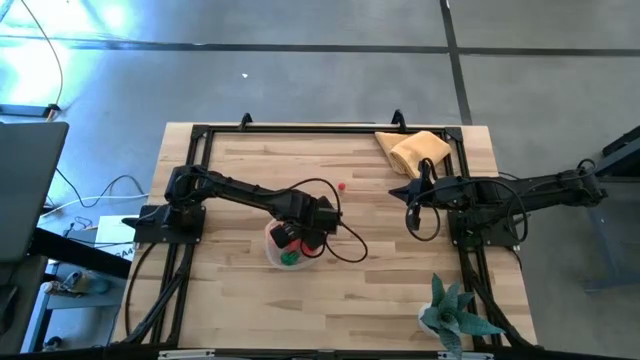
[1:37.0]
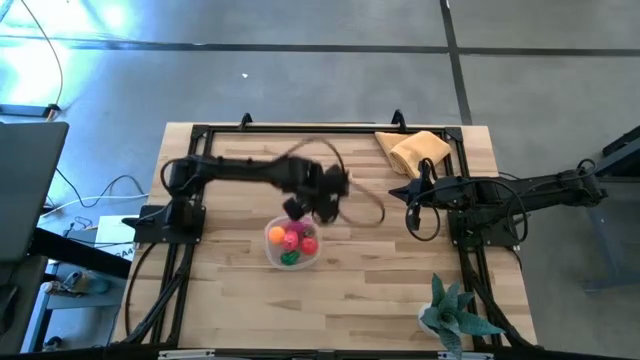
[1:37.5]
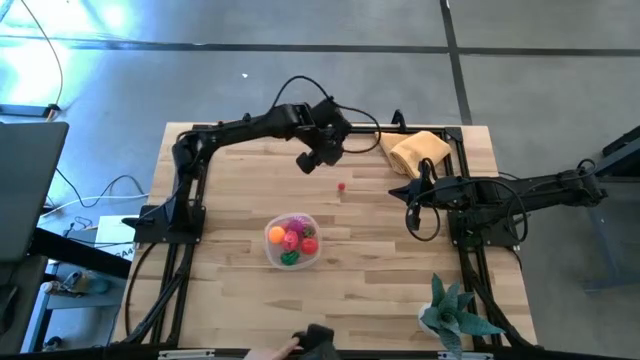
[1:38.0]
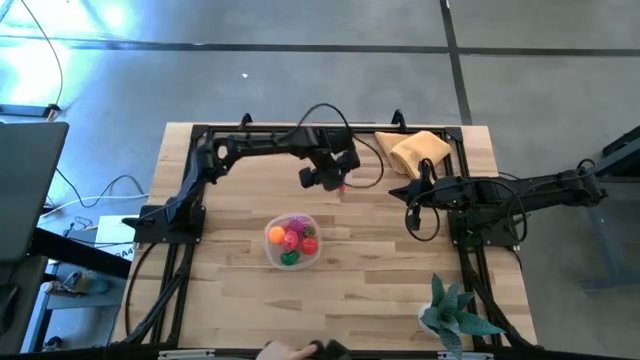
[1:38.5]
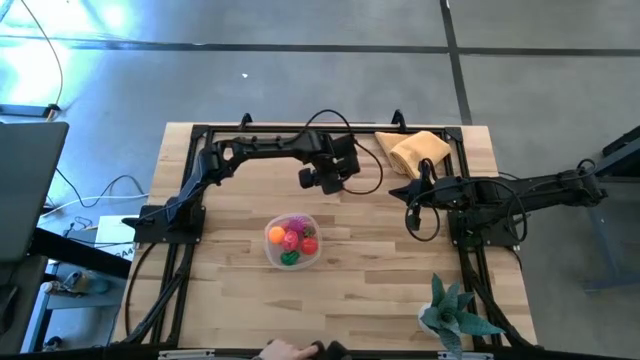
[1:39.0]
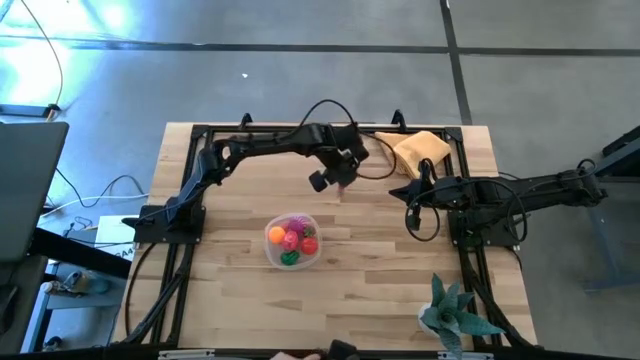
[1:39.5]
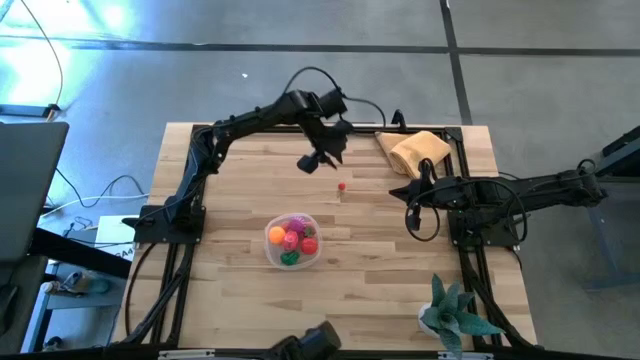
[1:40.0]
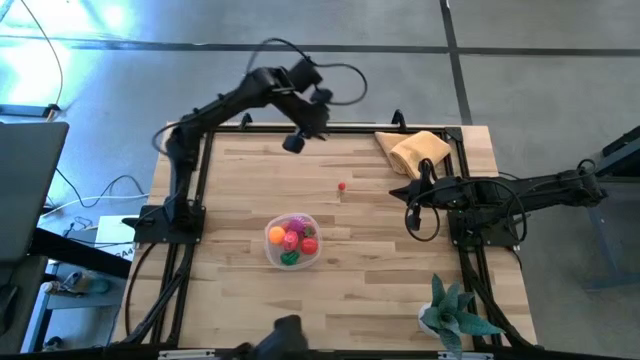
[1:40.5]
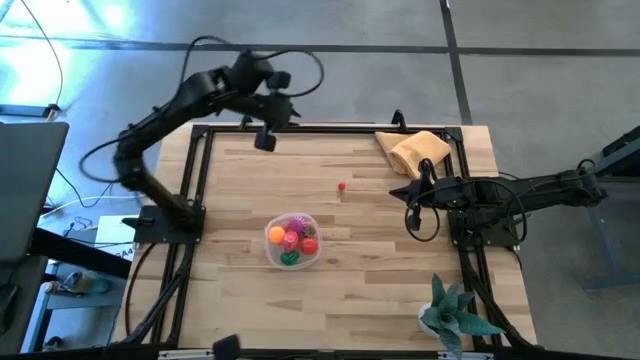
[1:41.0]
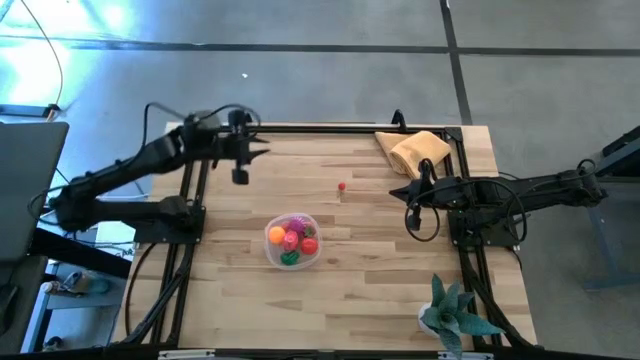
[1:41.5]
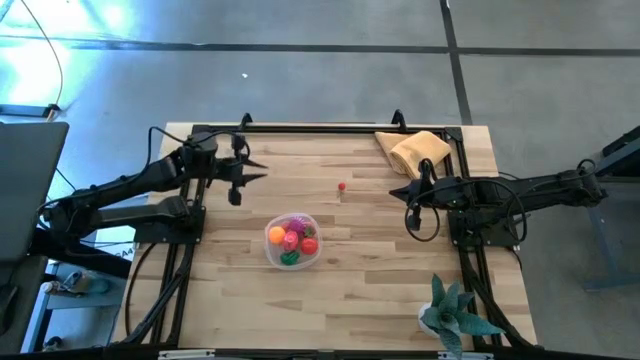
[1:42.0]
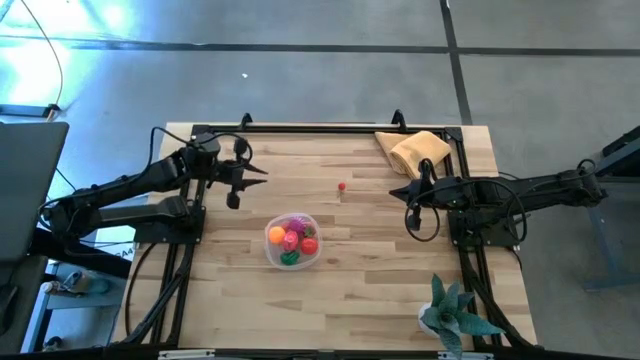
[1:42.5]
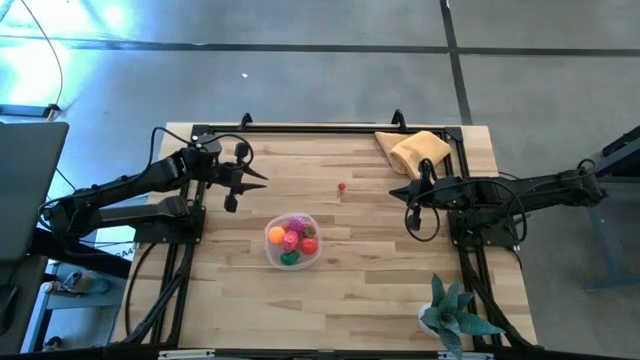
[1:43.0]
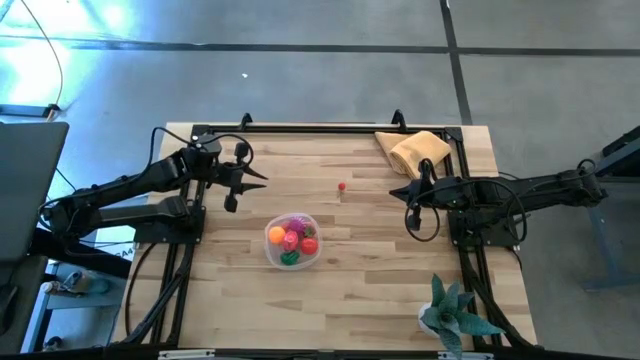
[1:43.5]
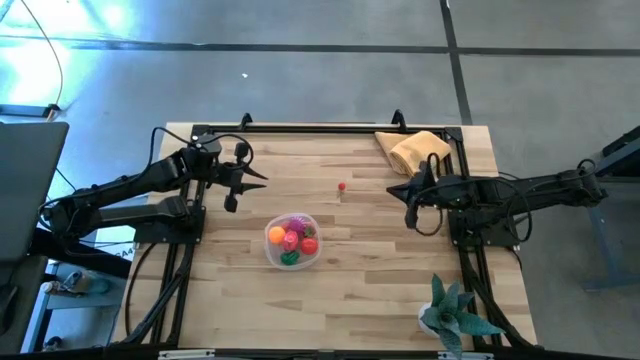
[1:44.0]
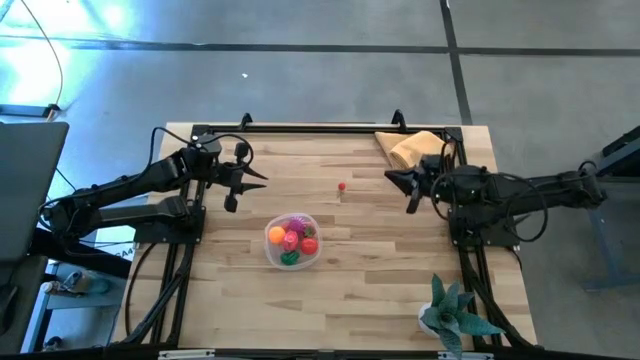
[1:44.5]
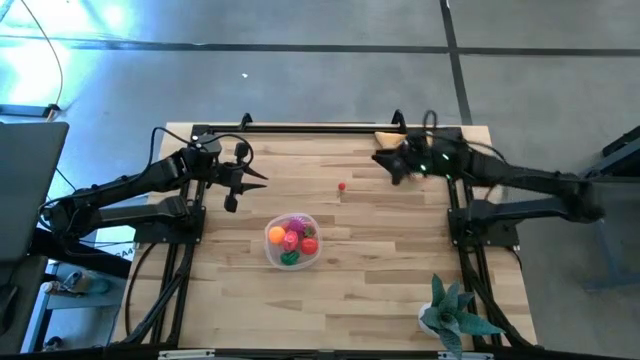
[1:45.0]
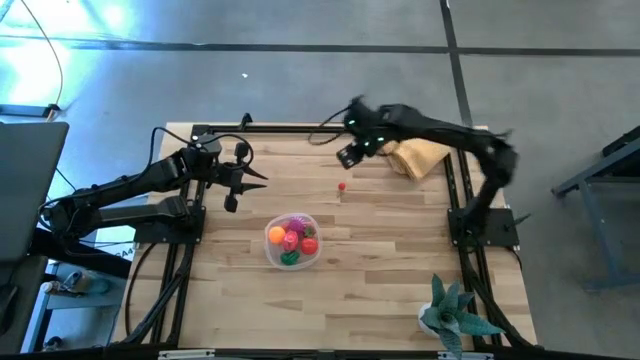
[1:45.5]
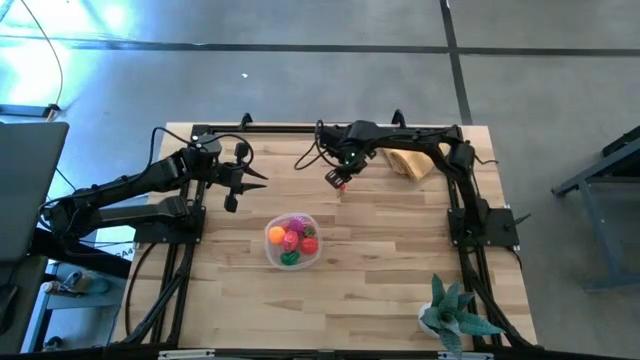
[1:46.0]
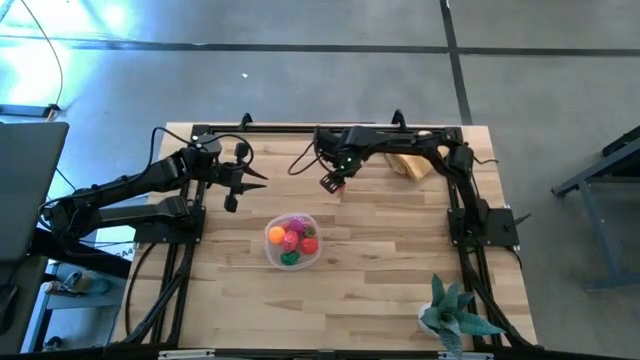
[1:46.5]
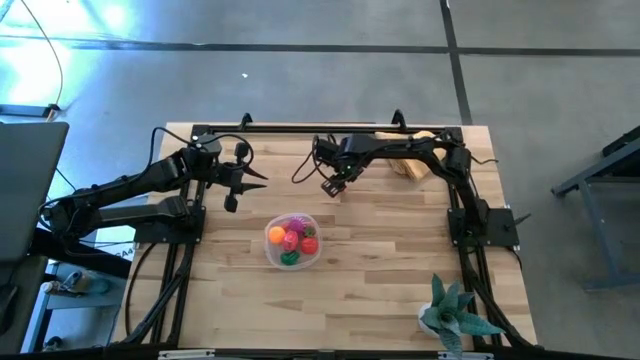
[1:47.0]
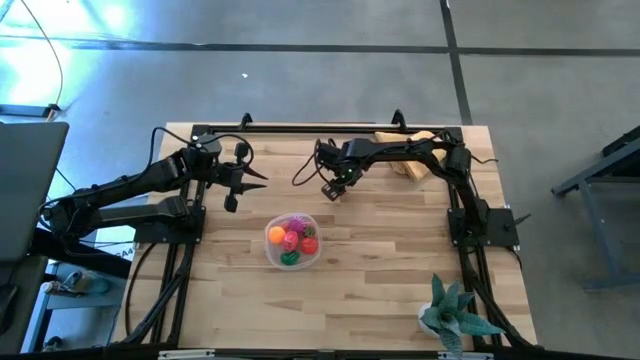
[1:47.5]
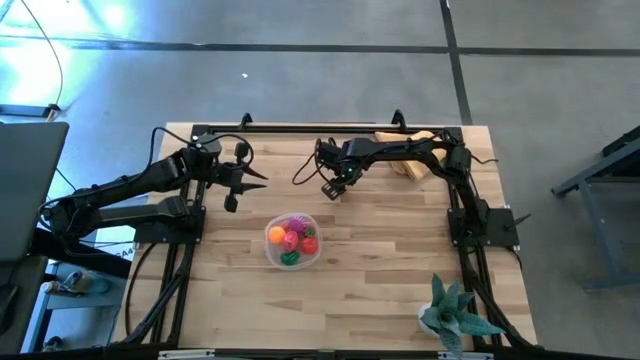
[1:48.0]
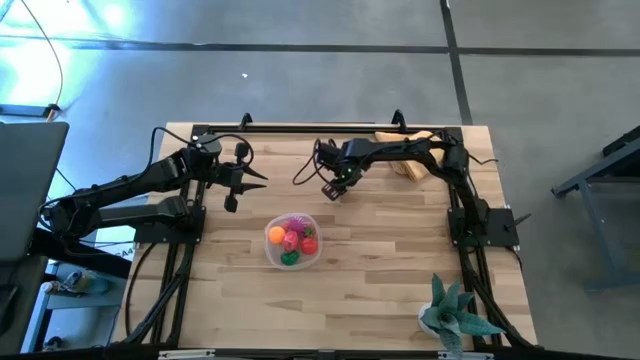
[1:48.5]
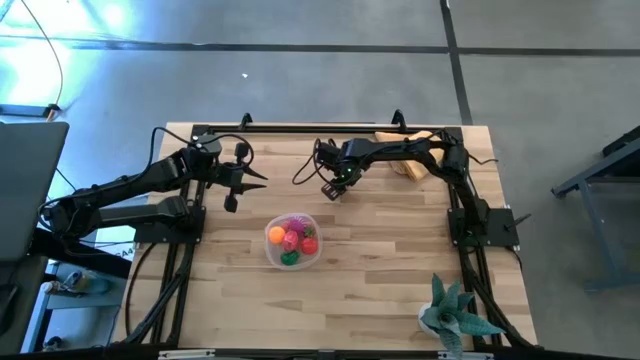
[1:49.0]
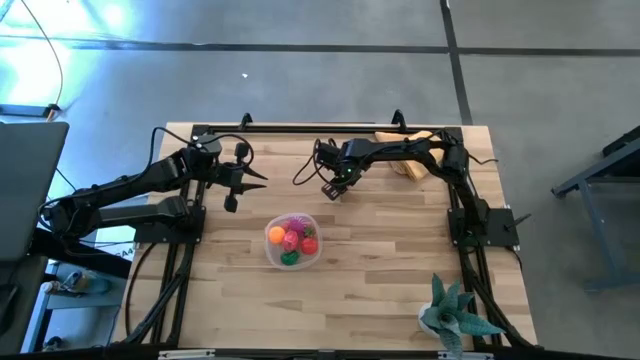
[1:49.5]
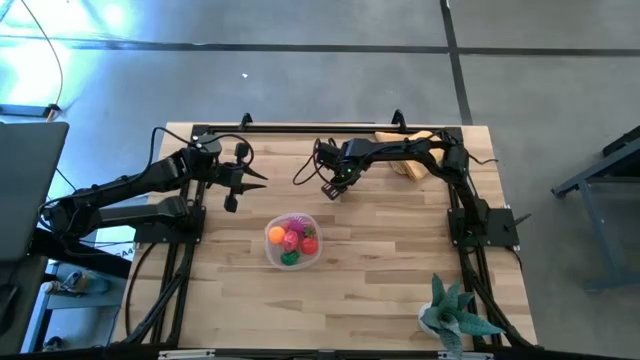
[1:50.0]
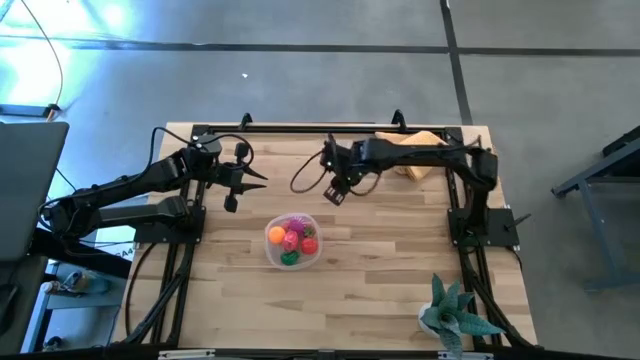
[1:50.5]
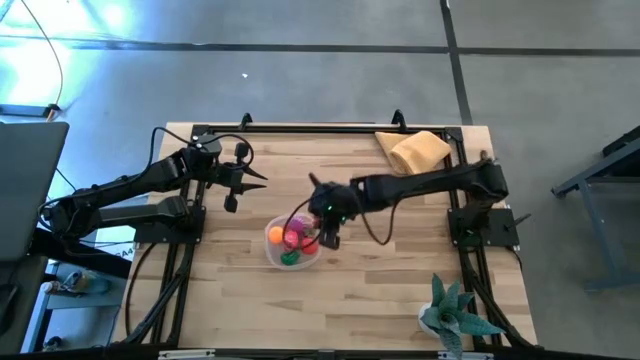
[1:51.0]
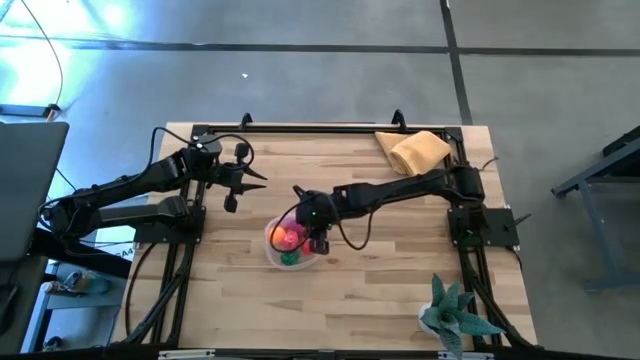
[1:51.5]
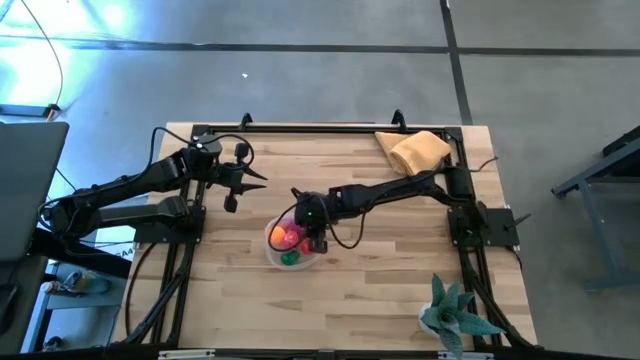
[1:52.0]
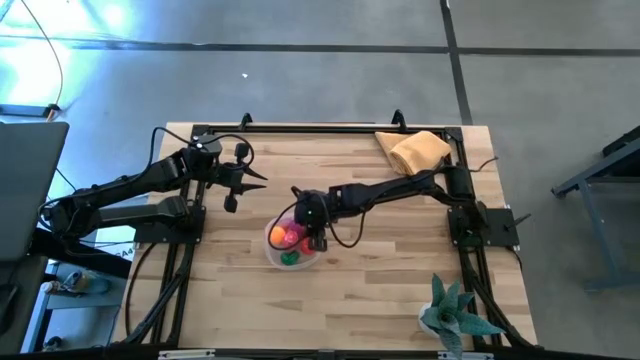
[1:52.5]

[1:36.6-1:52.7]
Task: Pick and placing Produce into tupperware
Put the red cherry into the transparent container

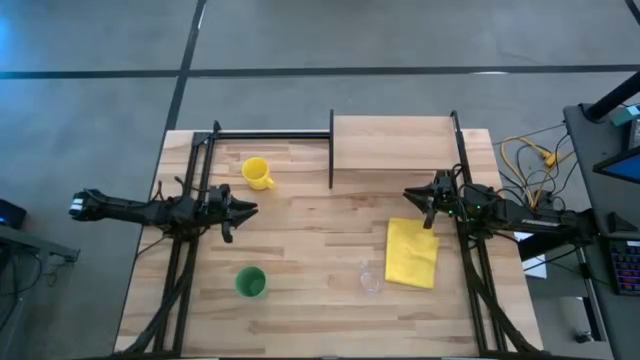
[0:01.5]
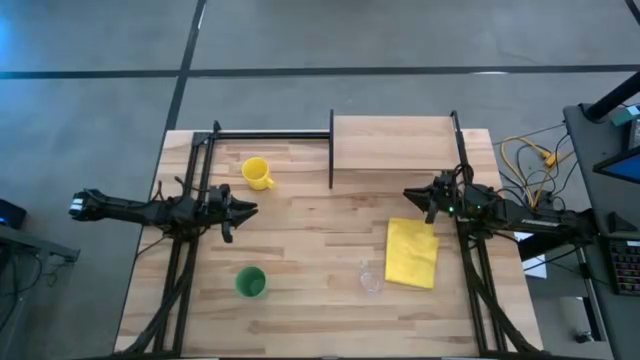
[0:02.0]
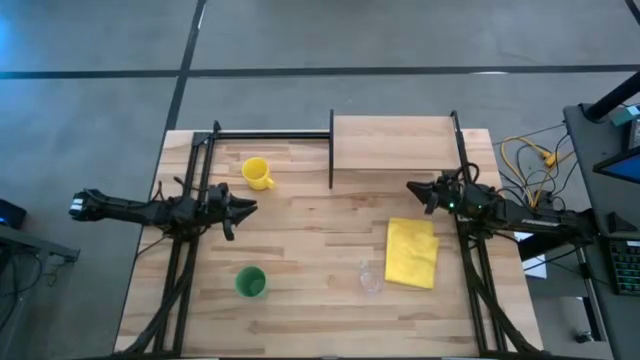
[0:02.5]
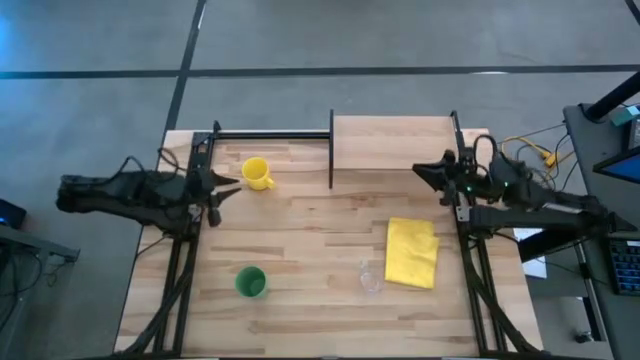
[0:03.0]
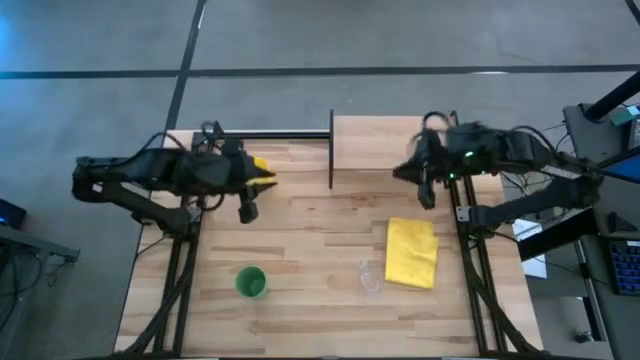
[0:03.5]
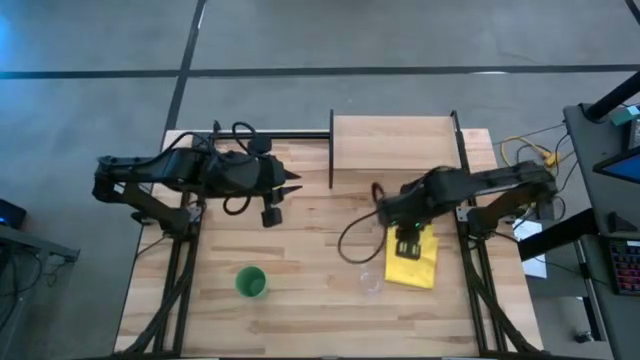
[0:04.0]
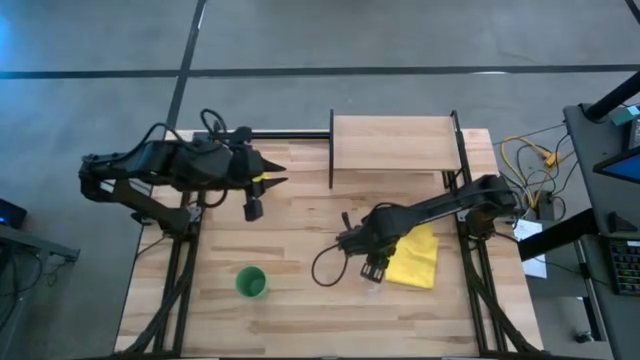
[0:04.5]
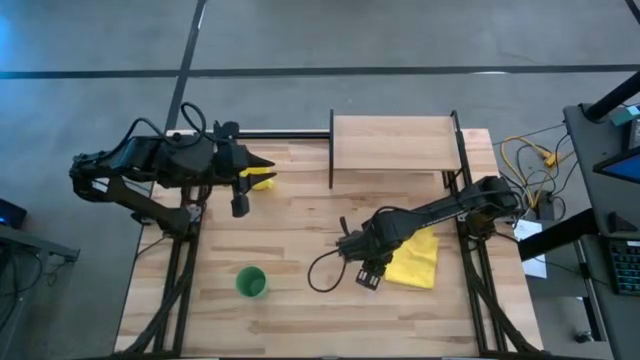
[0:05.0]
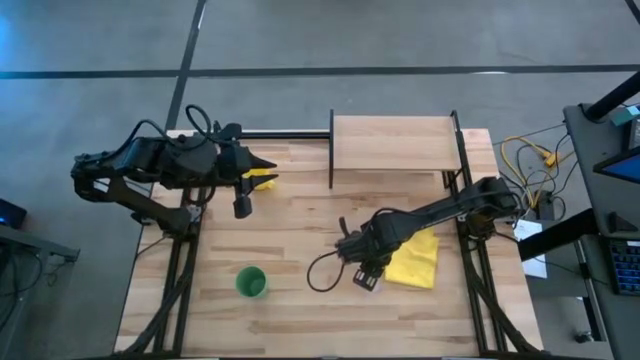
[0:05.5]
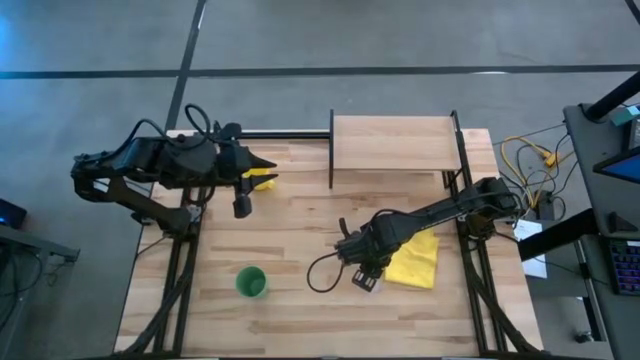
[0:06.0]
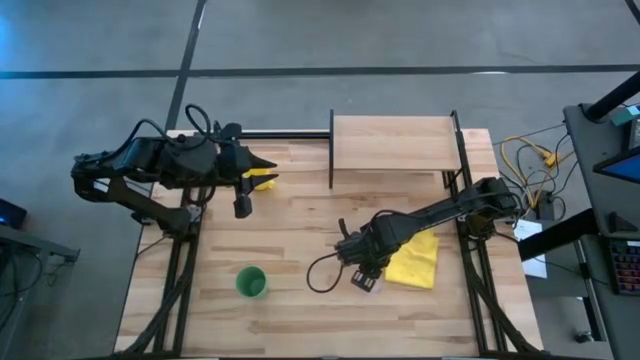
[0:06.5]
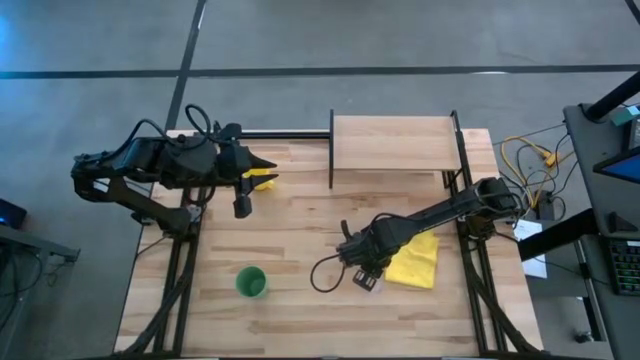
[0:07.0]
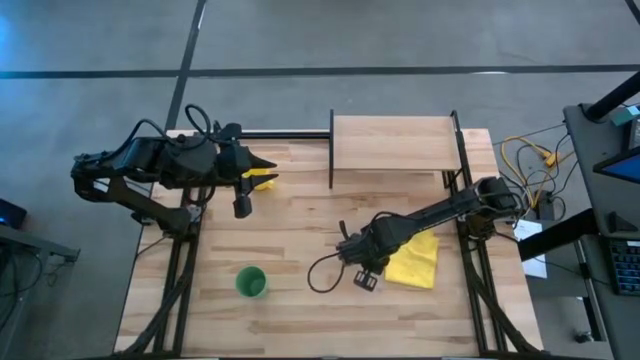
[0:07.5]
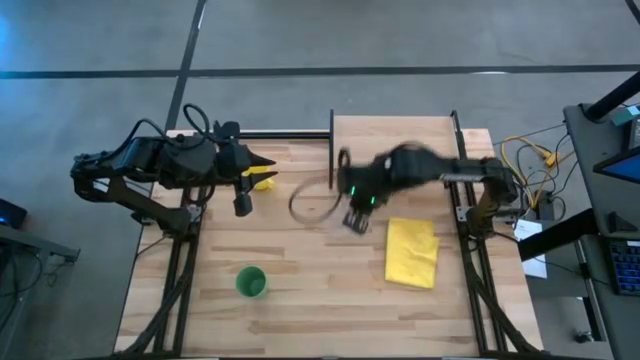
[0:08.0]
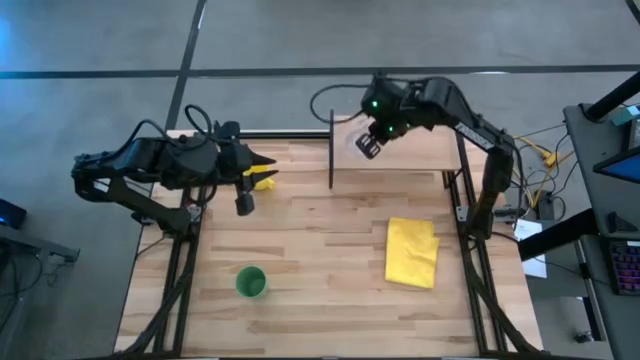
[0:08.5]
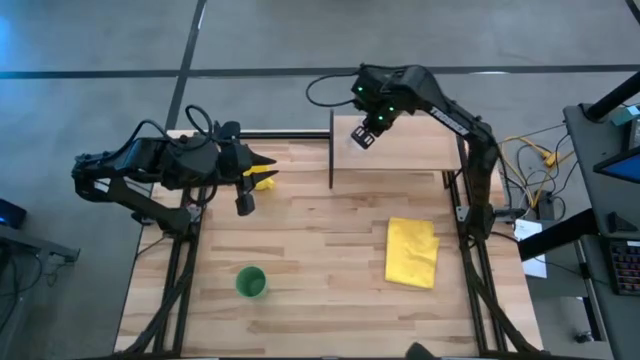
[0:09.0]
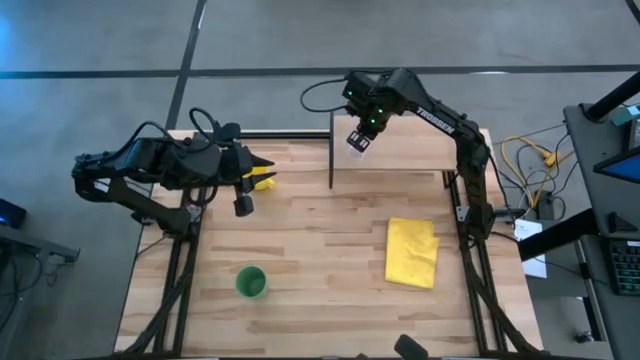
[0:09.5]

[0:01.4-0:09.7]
Task: Stack small to large cups/mugs on shelf
Put the transparent mug on the shelf
